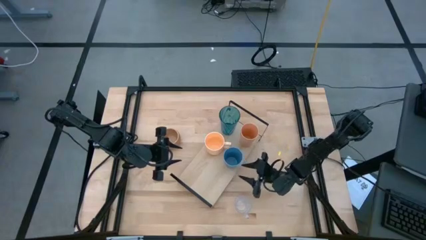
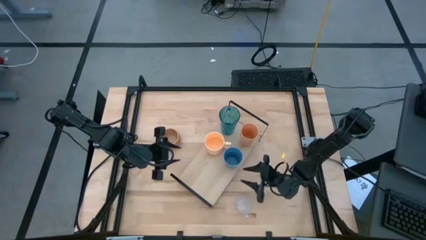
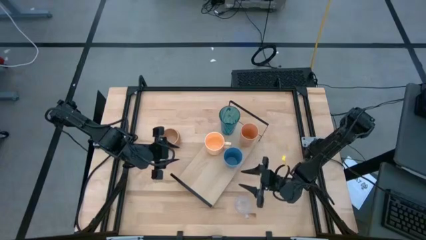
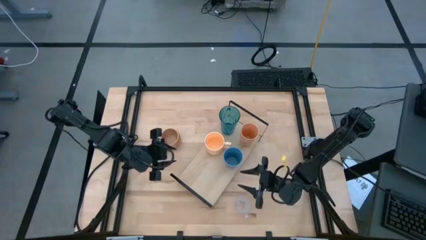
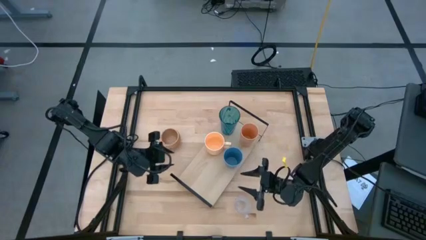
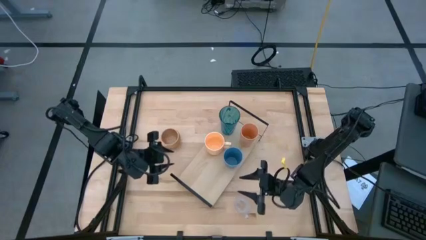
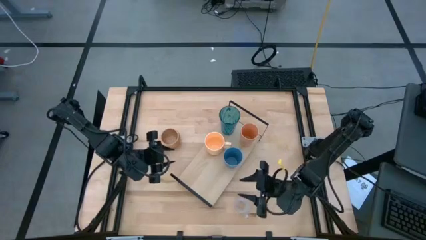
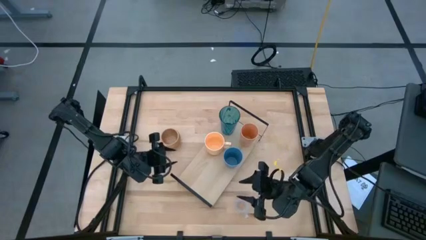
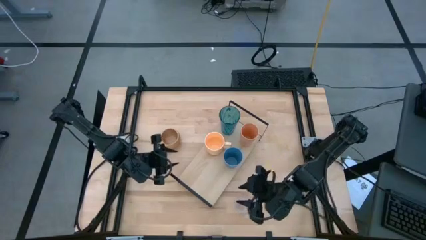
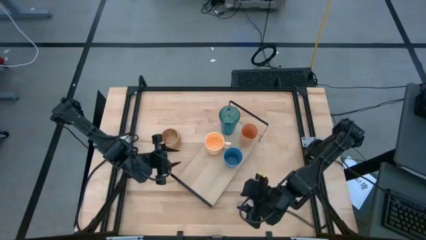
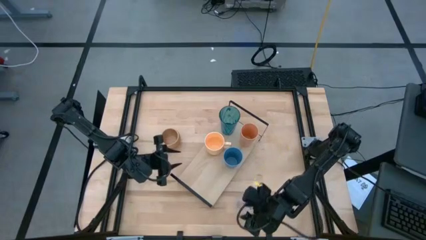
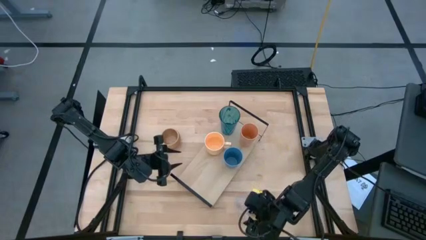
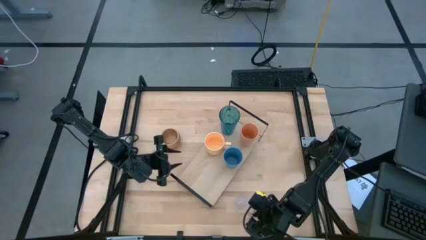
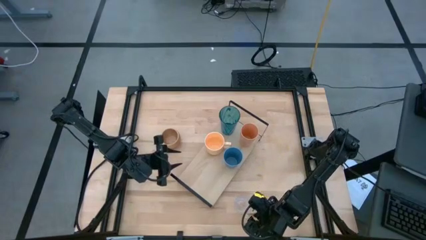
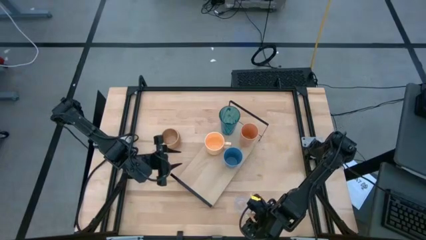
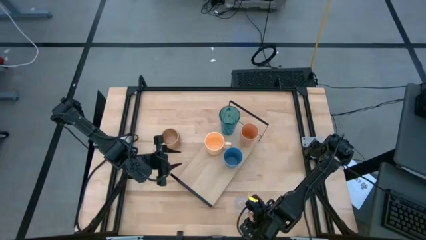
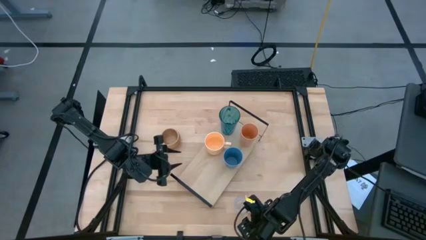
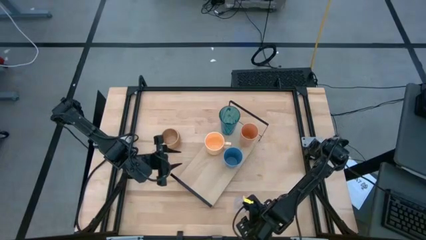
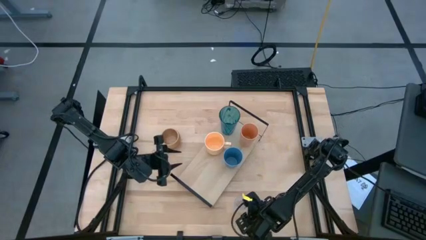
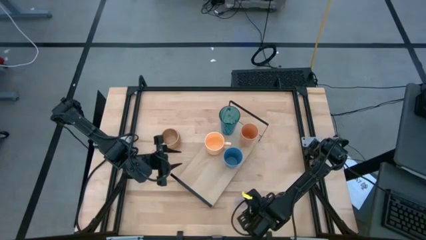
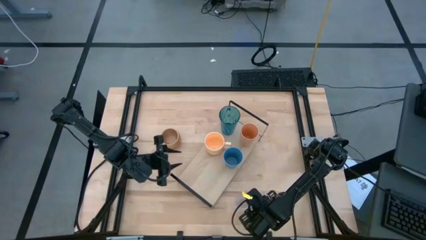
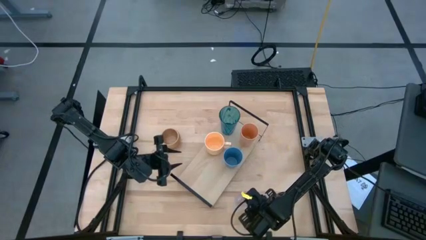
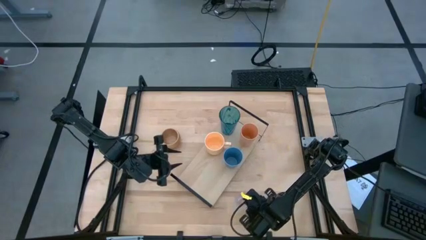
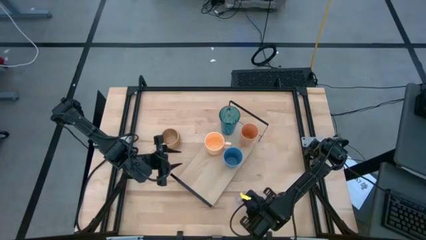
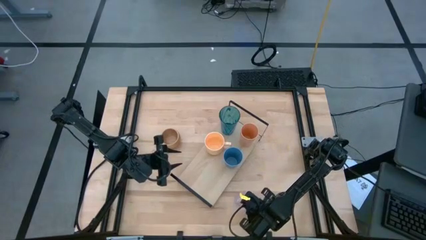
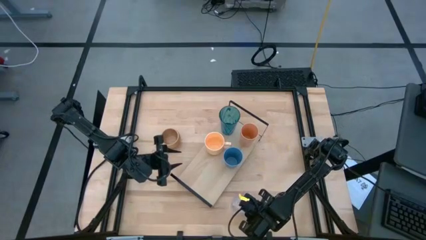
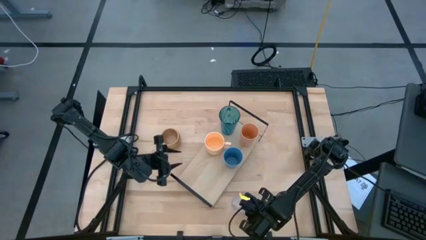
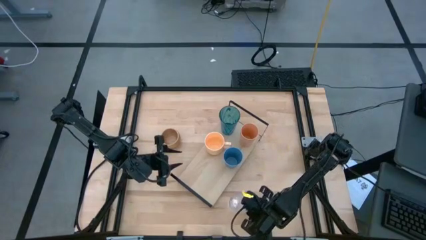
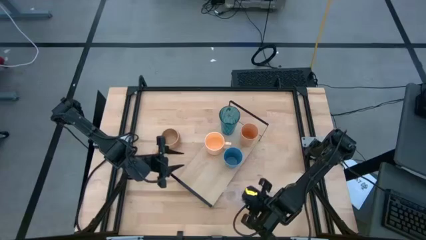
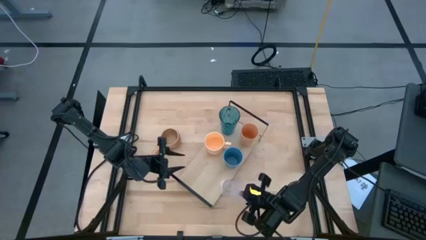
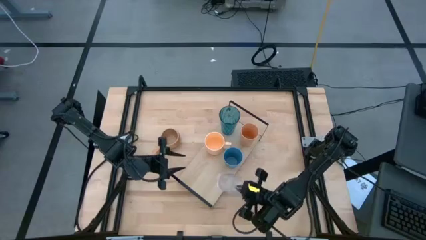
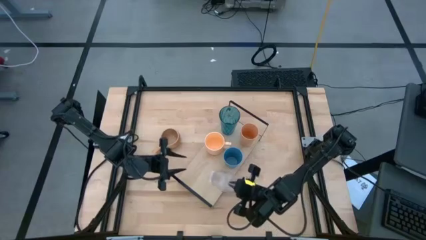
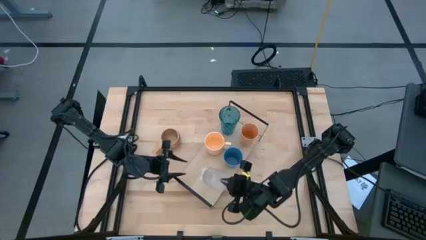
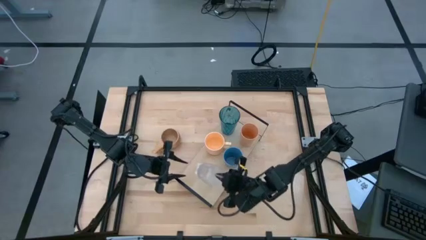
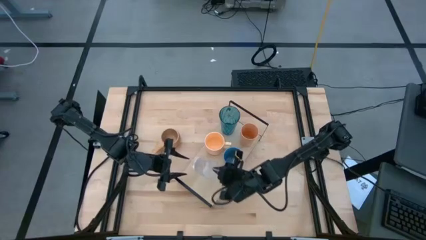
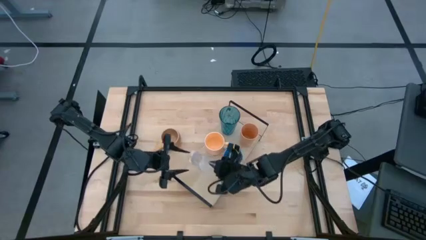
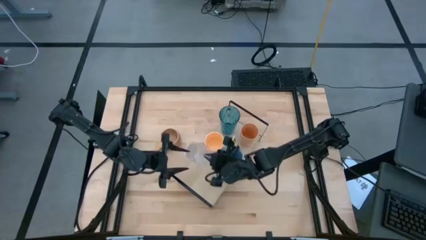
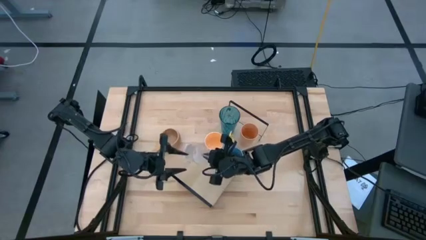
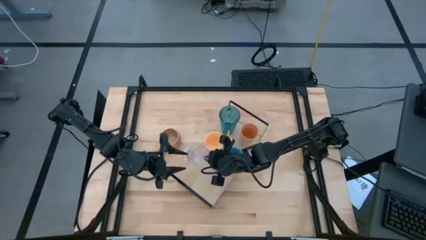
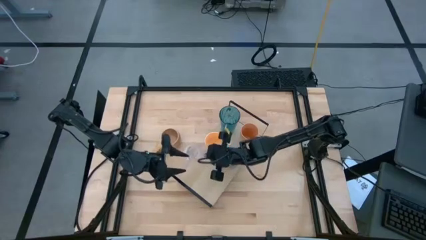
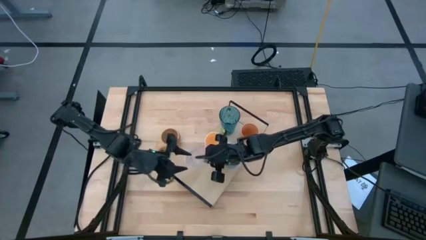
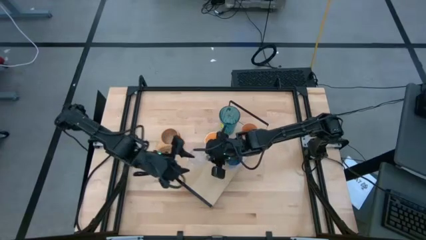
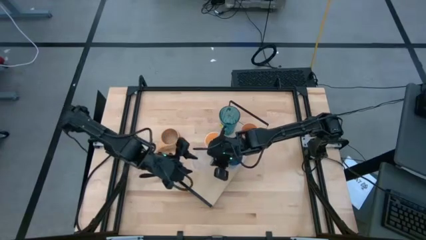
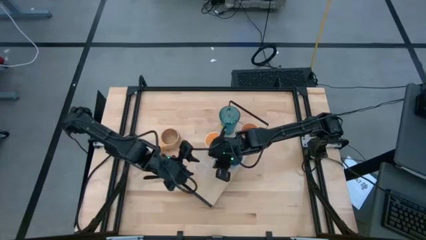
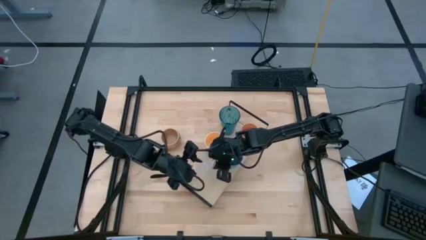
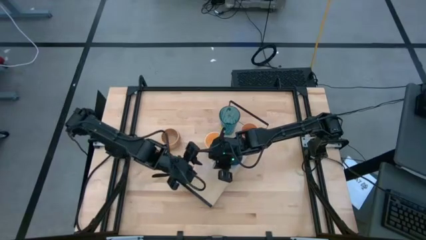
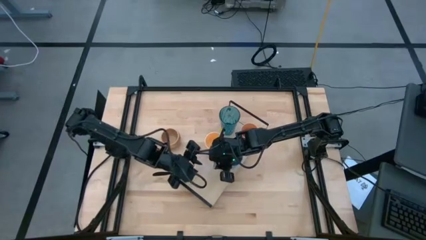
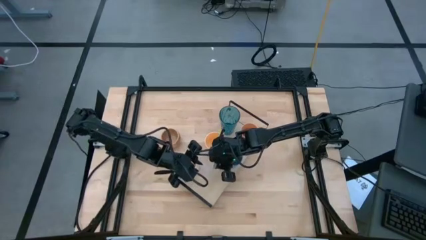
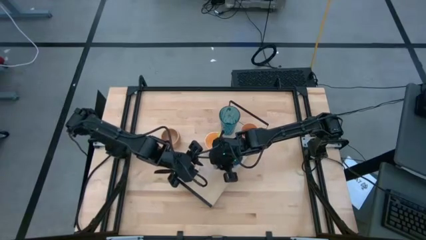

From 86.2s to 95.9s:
Task: Stack small to large cups/mugs on shelf
Put the transparent mug on the shelf

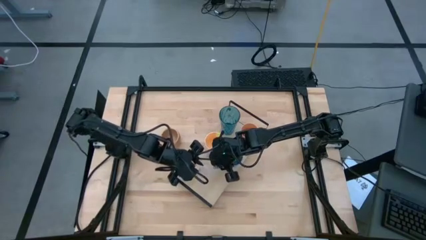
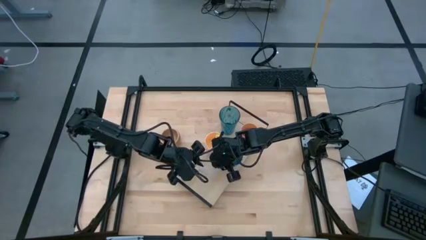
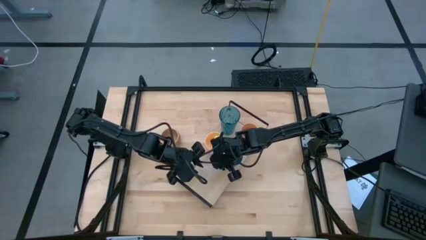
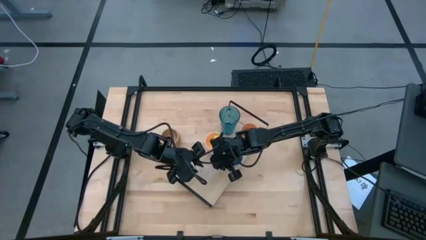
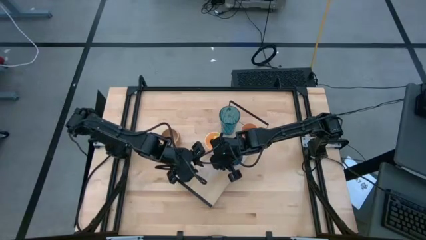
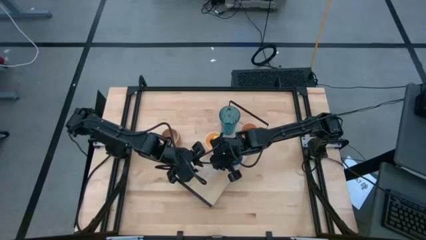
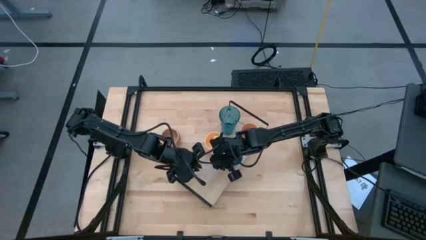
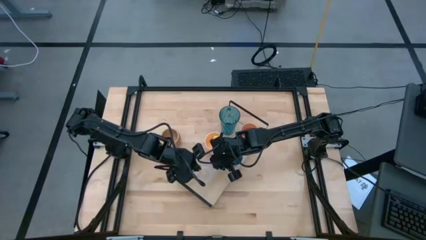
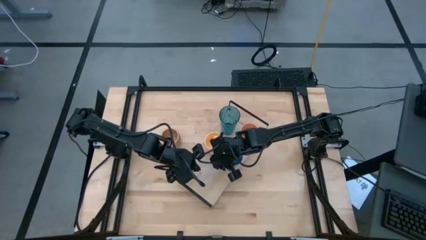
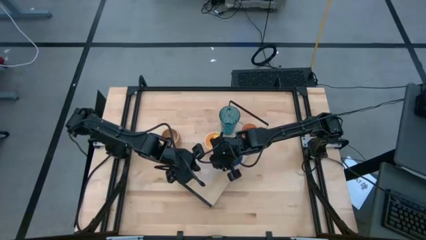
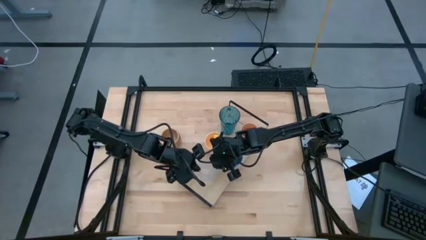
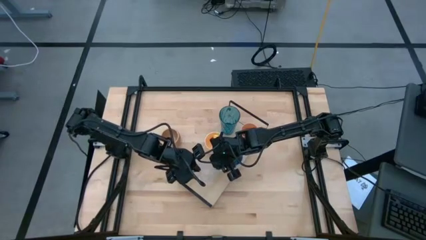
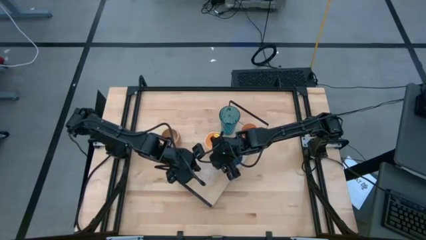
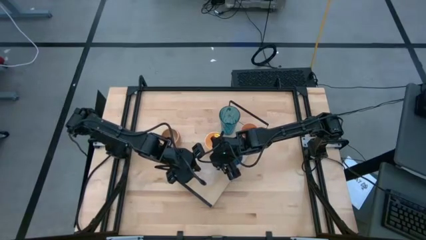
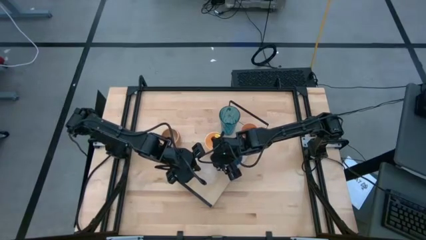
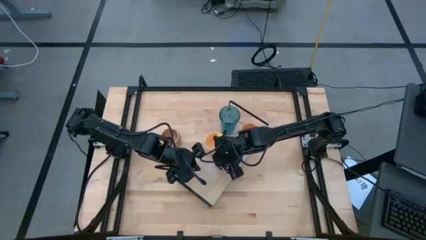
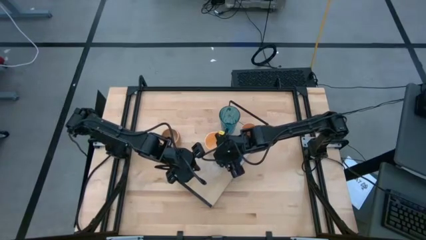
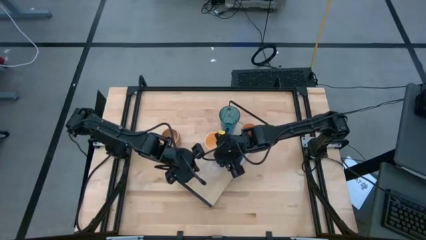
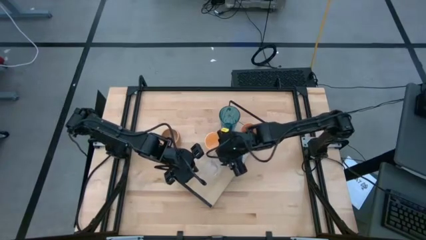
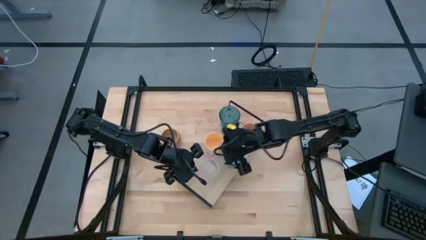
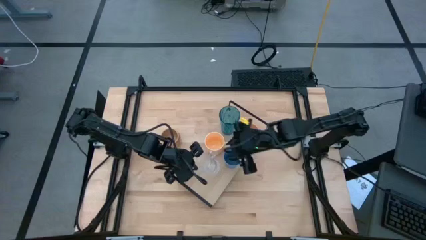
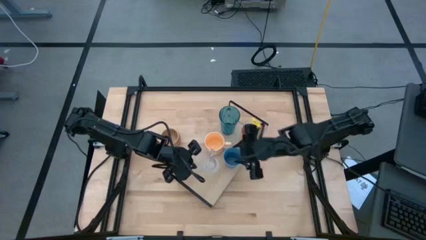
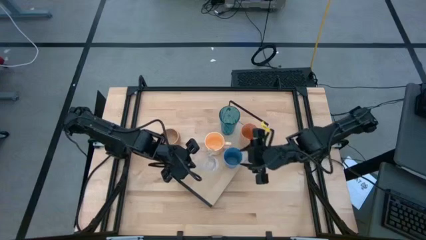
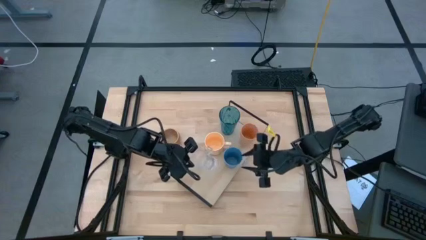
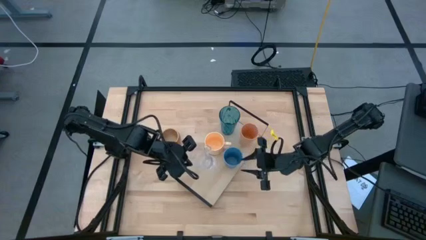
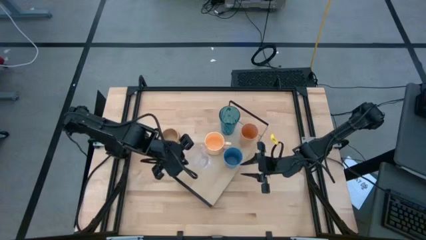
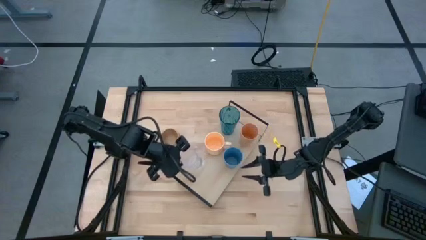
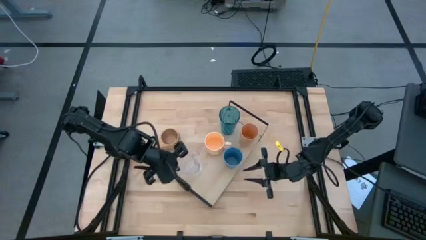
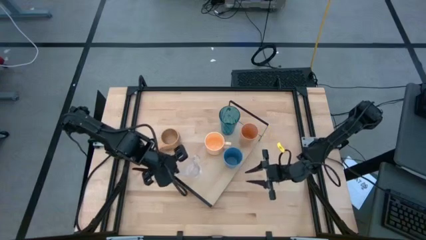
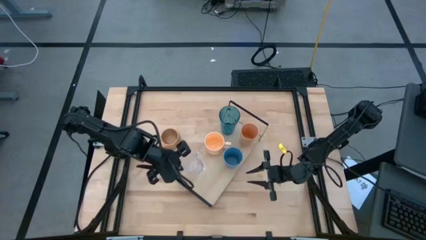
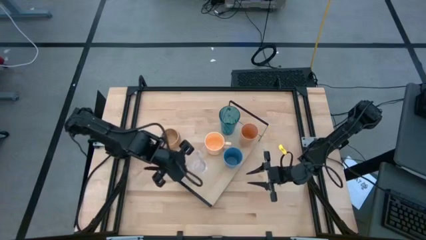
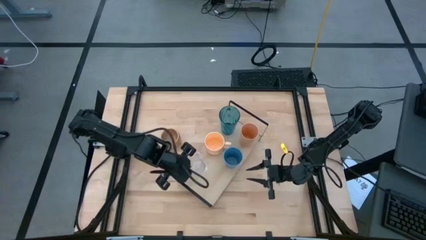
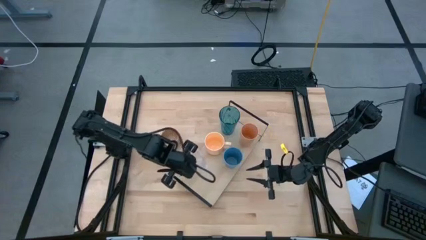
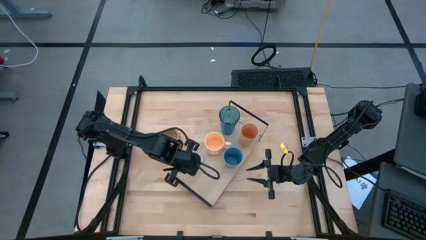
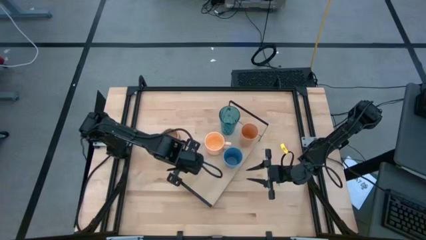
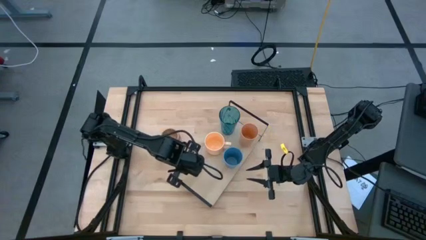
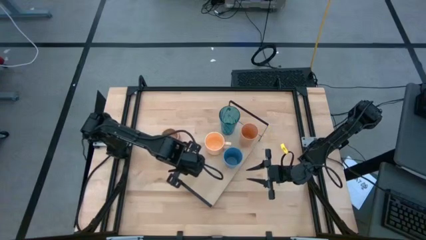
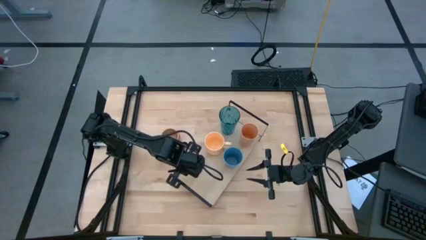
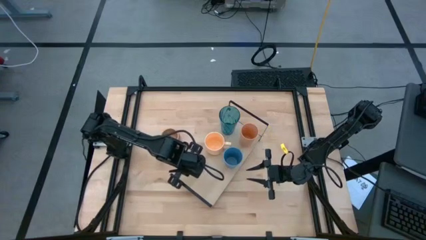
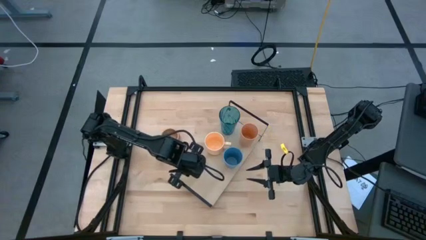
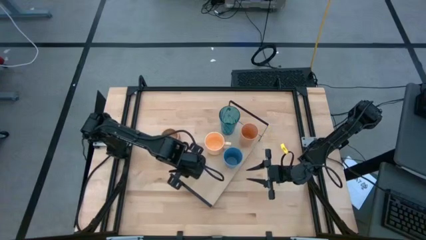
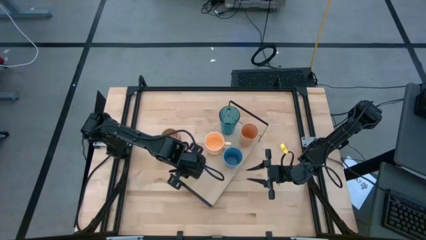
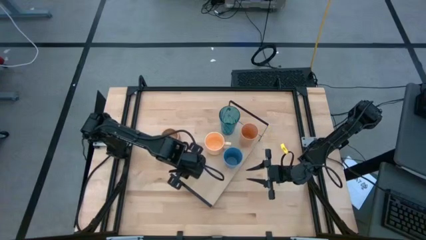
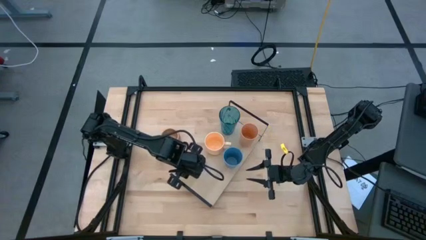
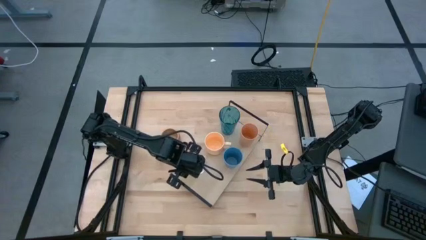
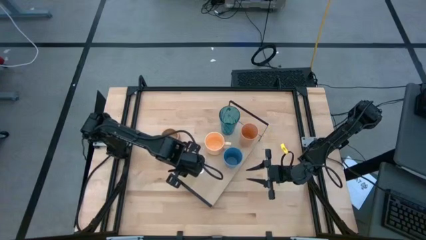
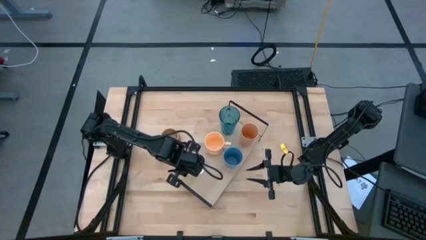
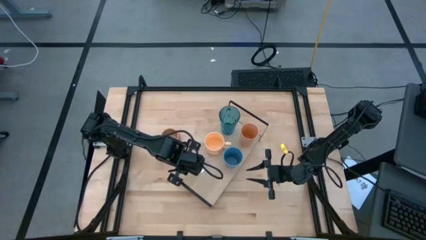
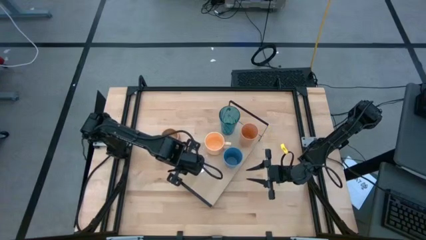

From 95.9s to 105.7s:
Put the transparent mug on the shelf
